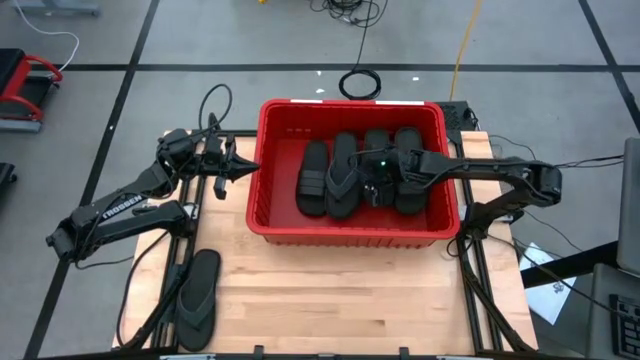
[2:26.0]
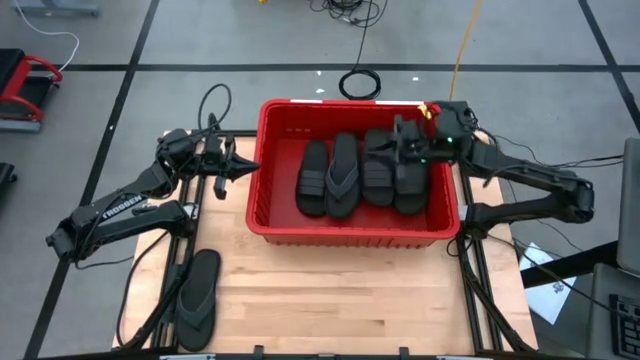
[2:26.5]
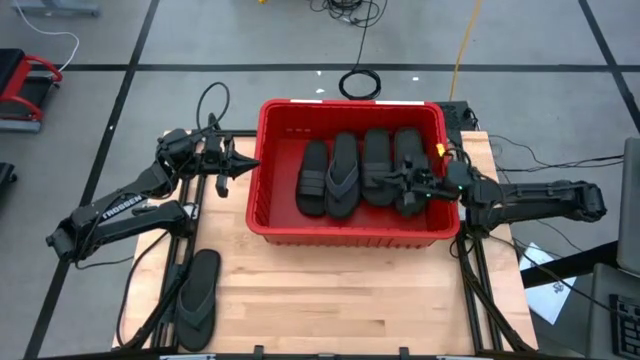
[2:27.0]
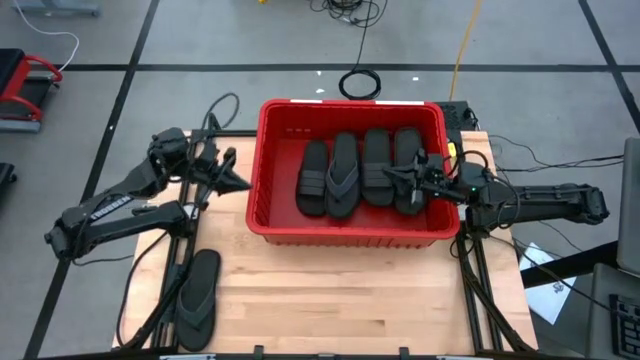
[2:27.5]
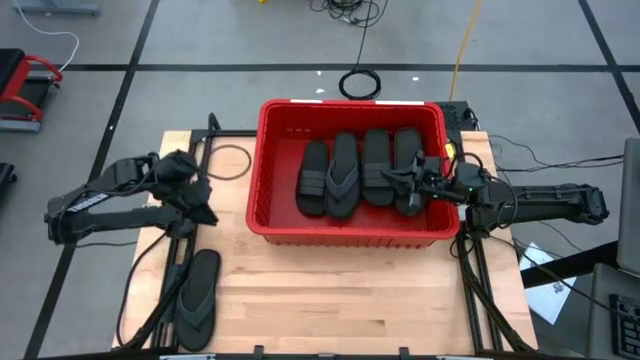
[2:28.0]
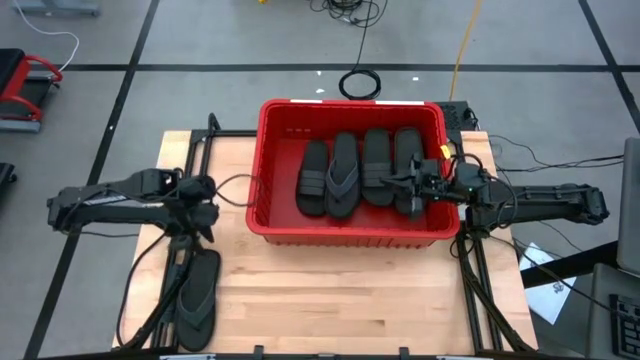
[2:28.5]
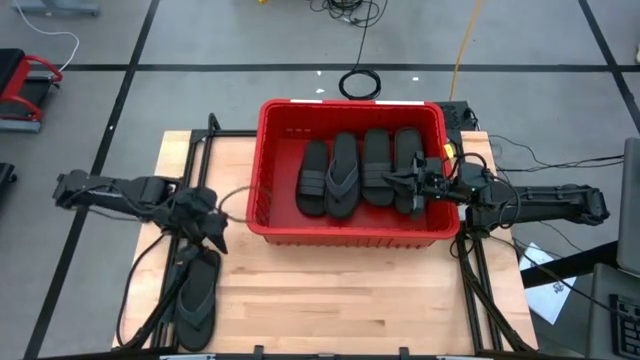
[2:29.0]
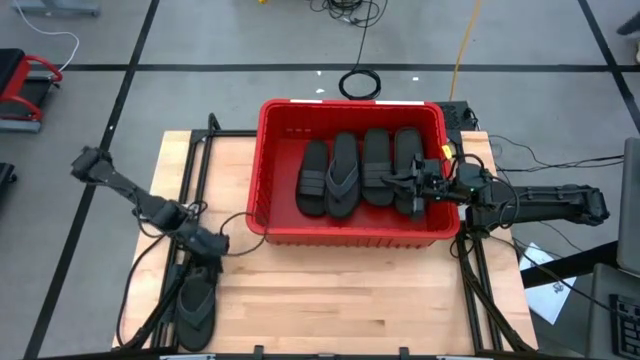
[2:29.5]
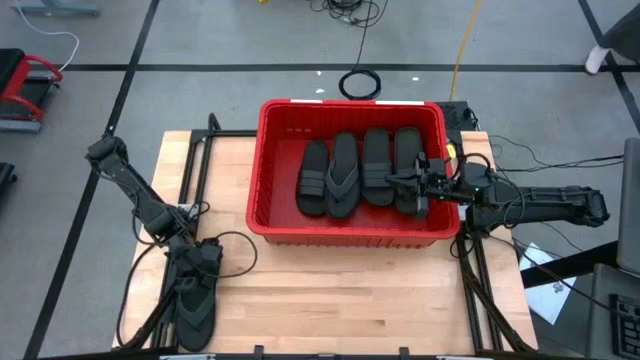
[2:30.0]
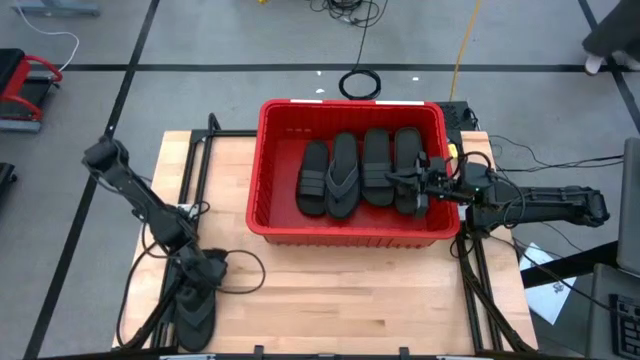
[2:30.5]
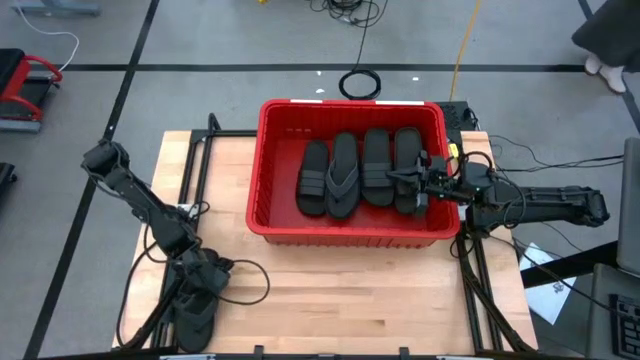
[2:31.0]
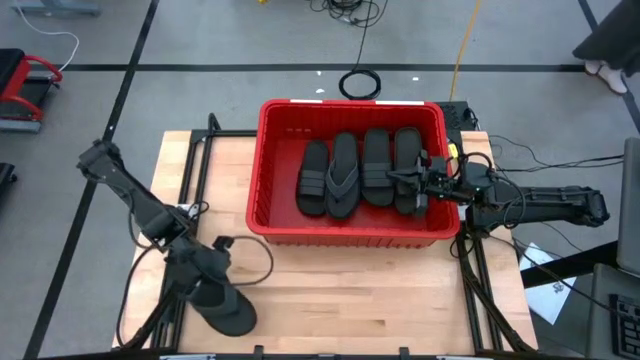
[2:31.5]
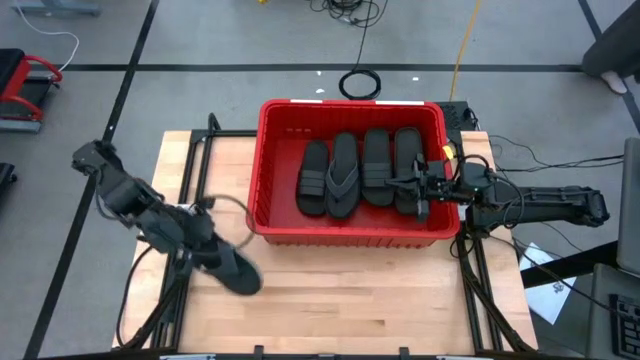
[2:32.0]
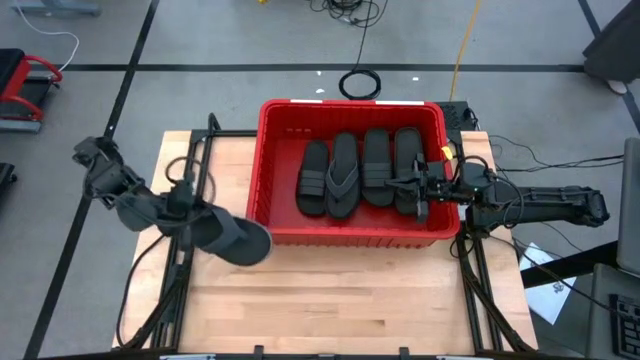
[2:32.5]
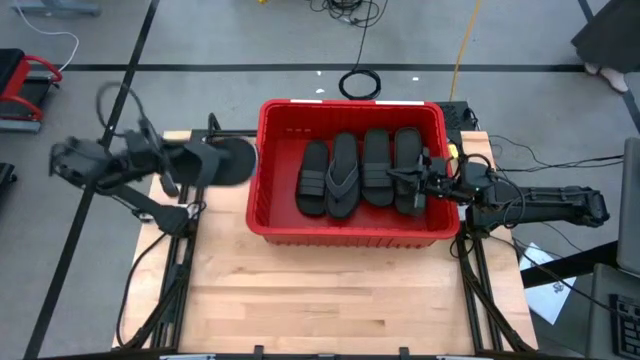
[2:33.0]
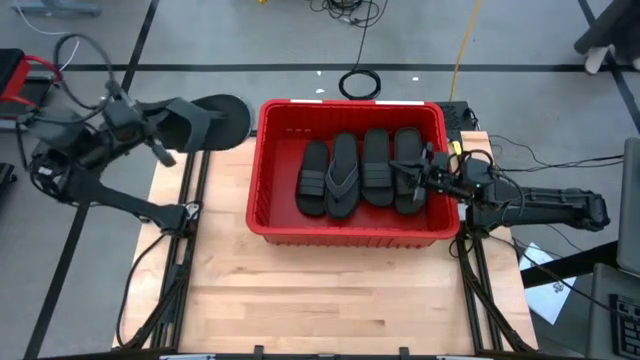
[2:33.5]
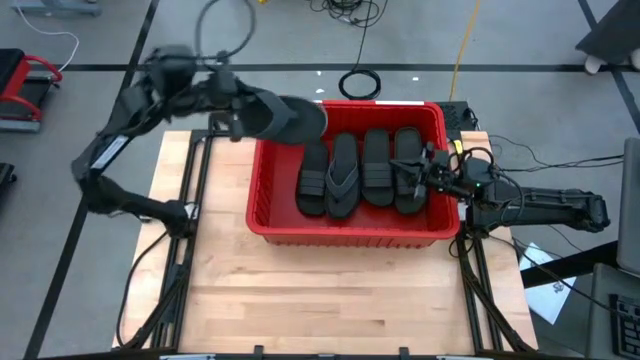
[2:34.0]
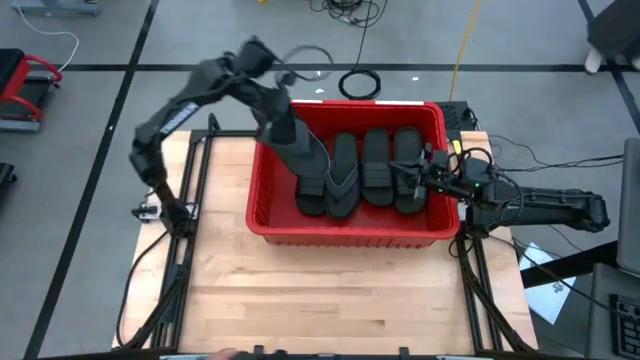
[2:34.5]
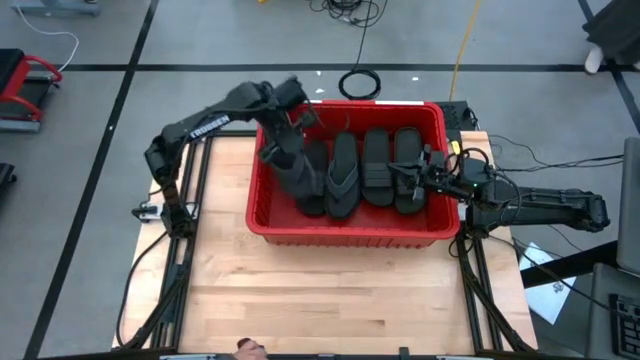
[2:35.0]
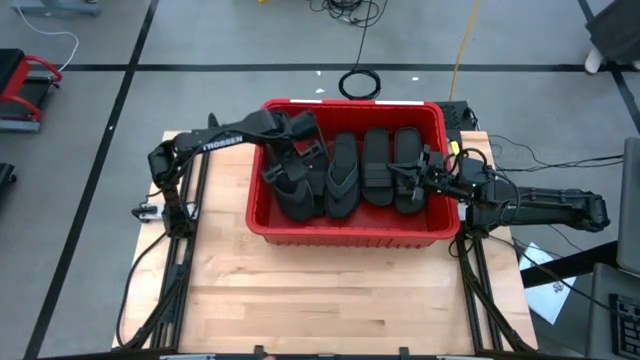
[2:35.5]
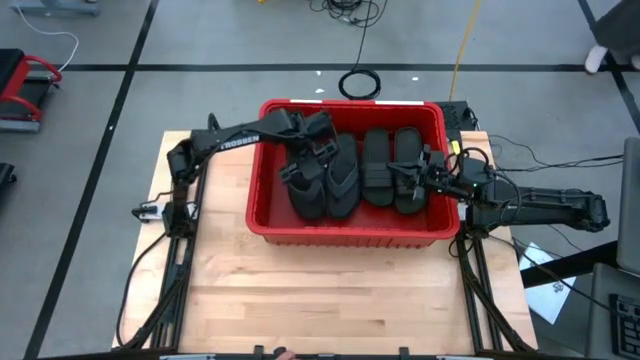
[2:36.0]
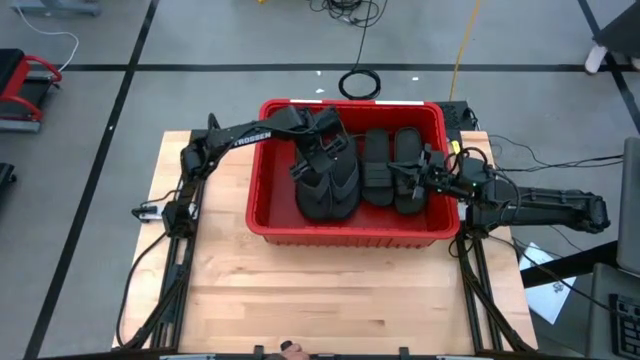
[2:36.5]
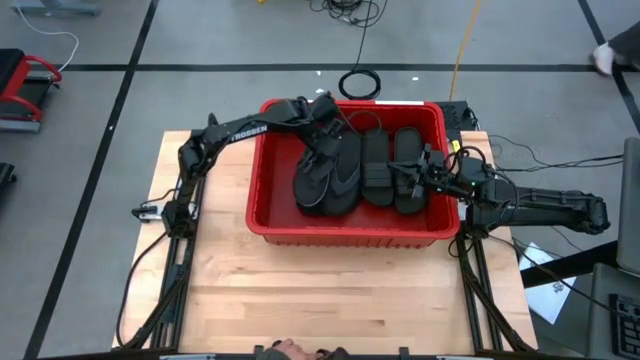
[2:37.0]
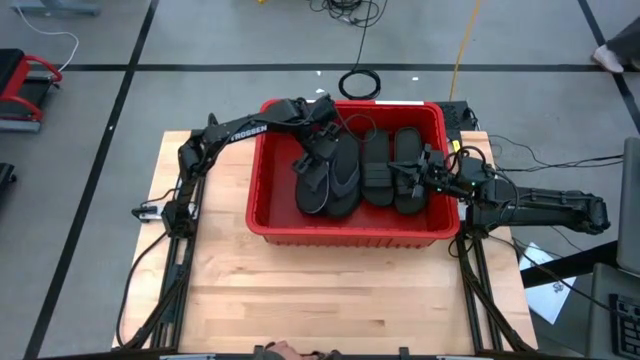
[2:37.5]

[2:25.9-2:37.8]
Task: Pick and place slides into bin
Put the black slipper into the red bin

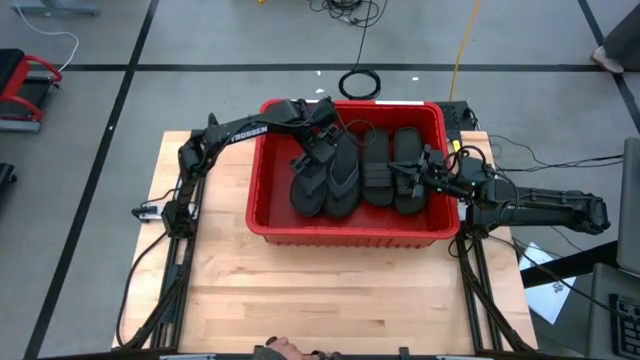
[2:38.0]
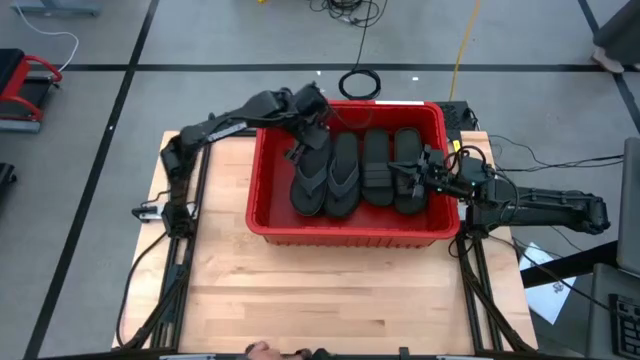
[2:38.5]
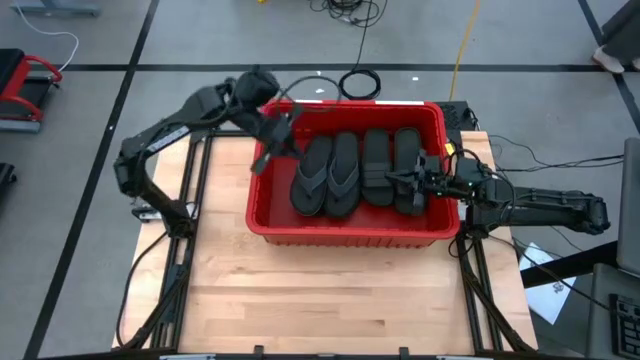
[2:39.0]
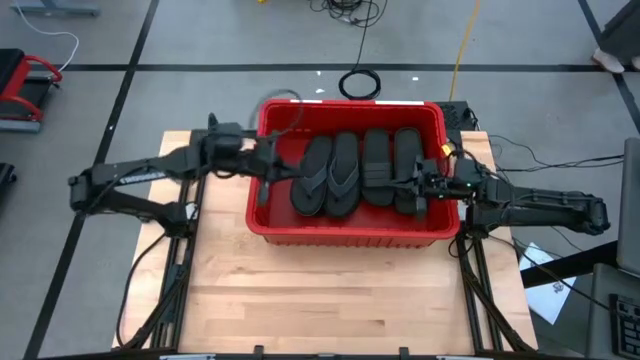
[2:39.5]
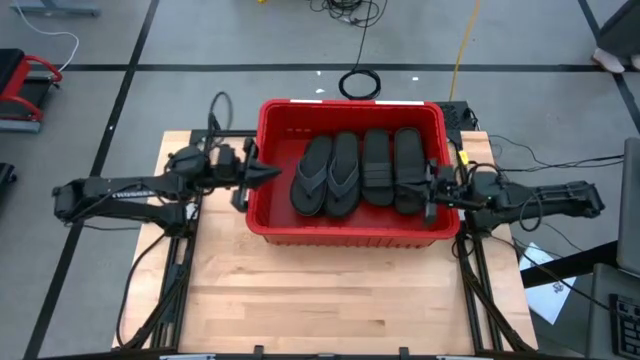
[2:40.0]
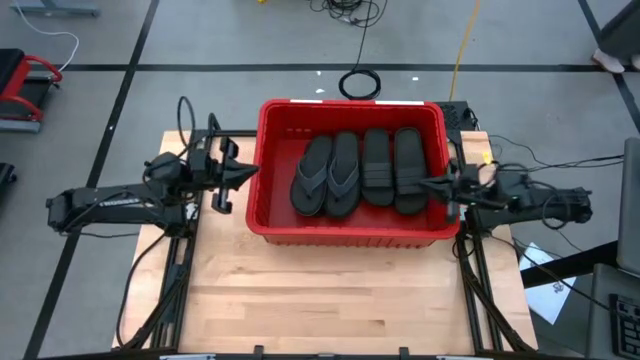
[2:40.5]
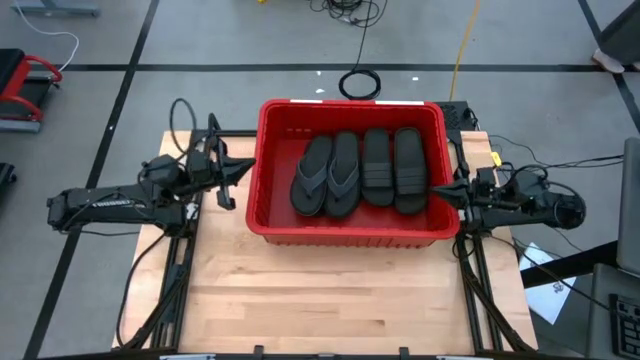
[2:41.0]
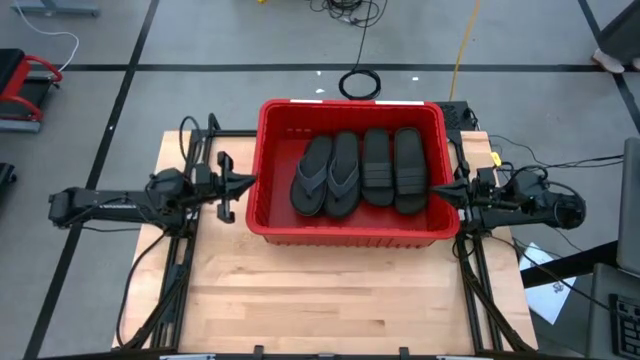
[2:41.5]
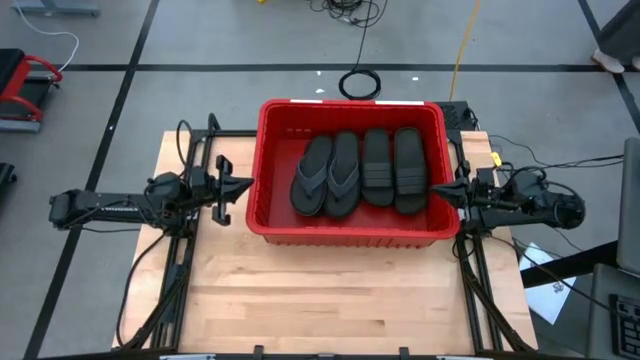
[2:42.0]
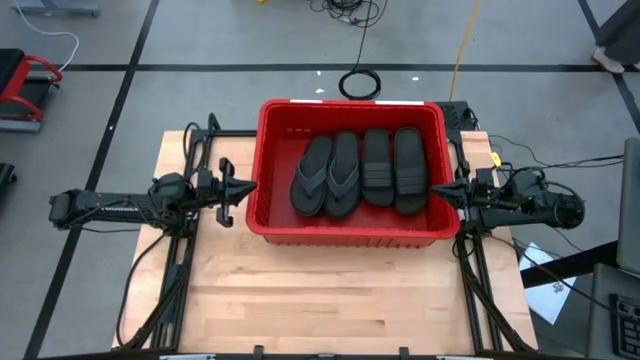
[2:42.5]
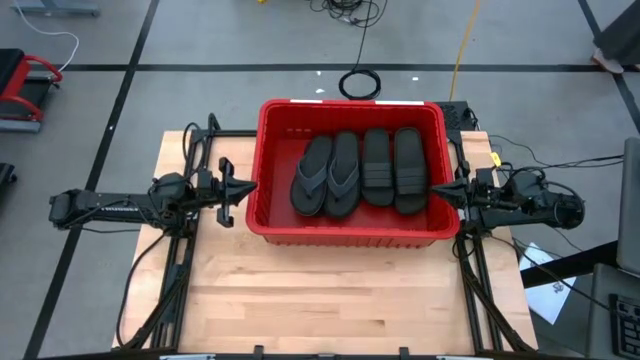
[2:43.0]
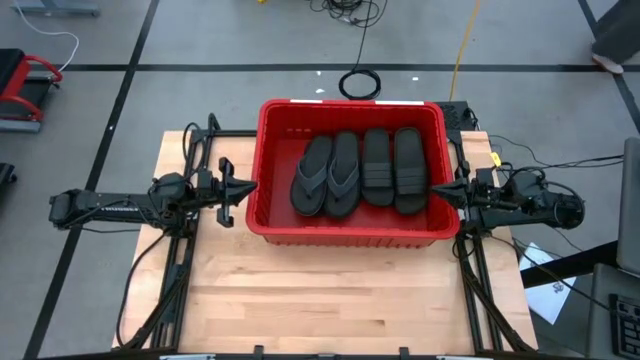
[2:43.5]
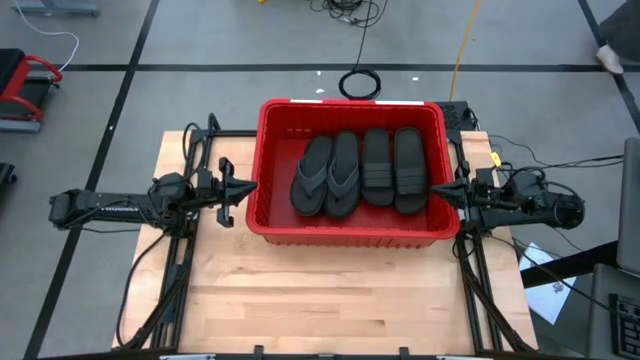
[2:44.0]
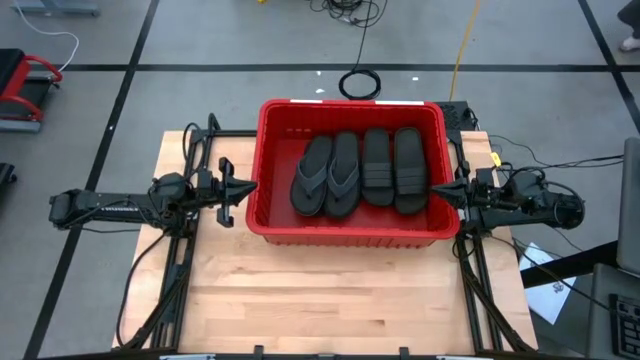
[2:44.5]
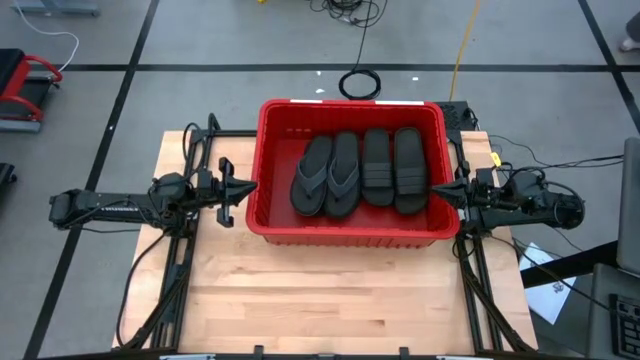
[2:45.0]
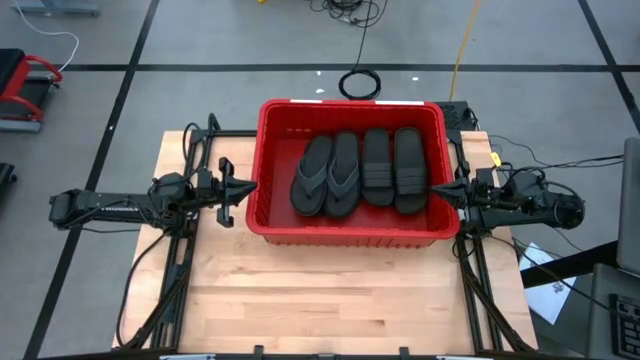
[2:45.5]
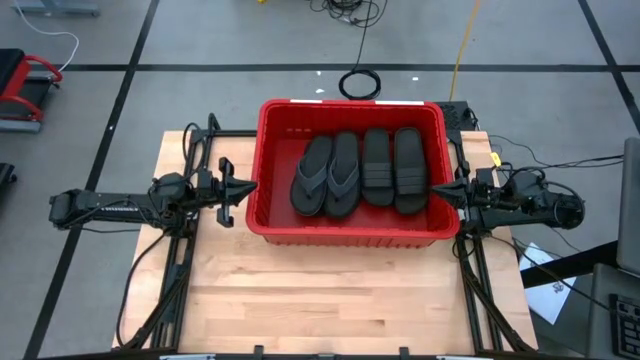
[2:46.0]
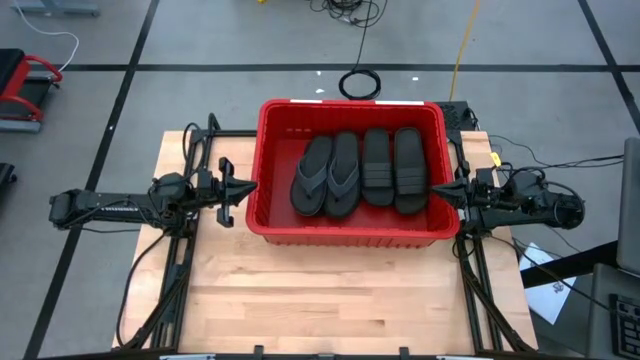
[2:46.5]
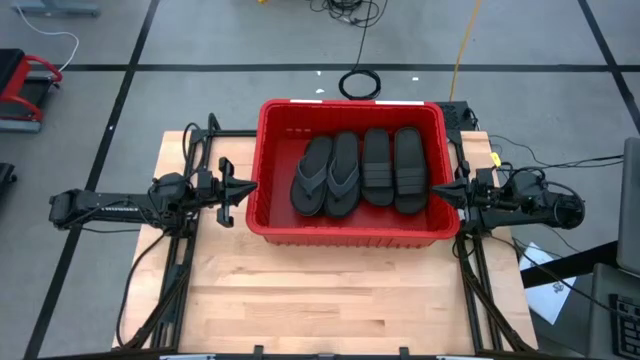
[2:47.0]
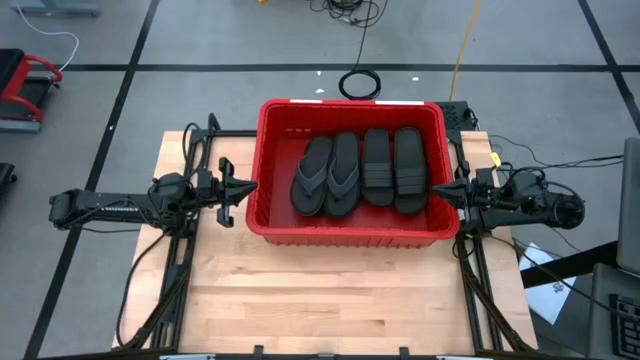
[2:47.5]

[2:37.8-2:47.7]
Return to Home Position

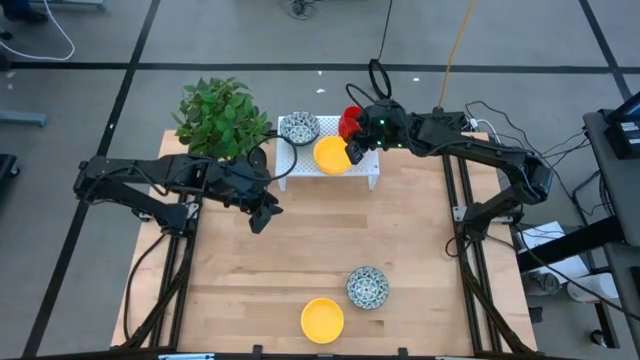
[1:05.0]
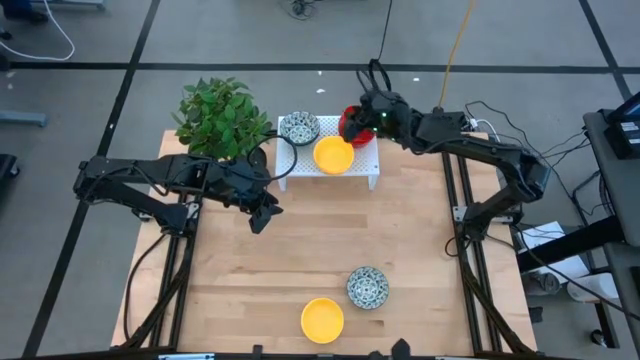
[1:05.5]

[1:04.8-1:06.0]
Task: Pick & Place Mini bowls
Adjust the red bowls on the shelf
